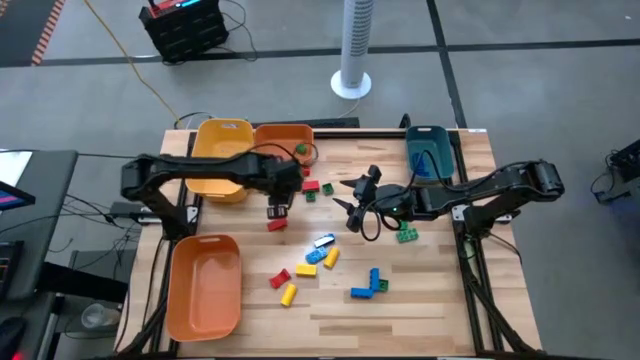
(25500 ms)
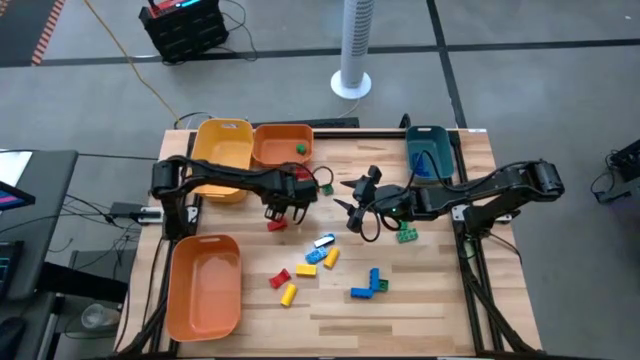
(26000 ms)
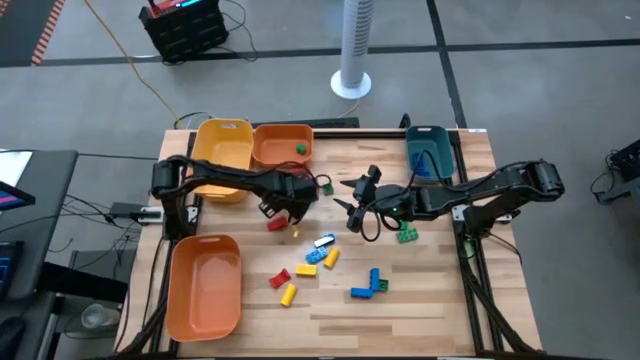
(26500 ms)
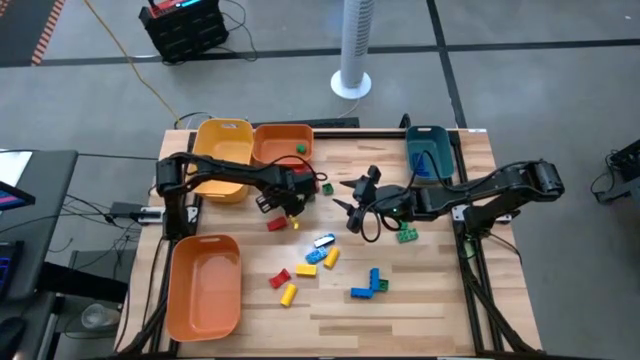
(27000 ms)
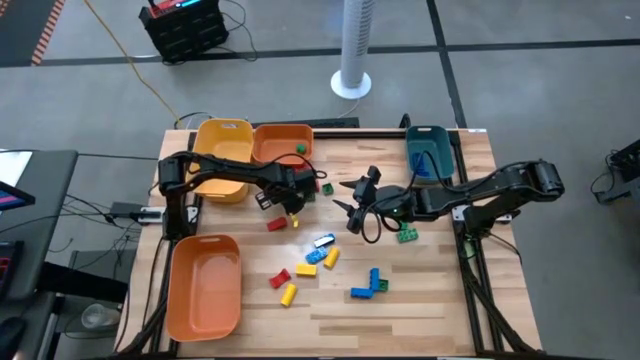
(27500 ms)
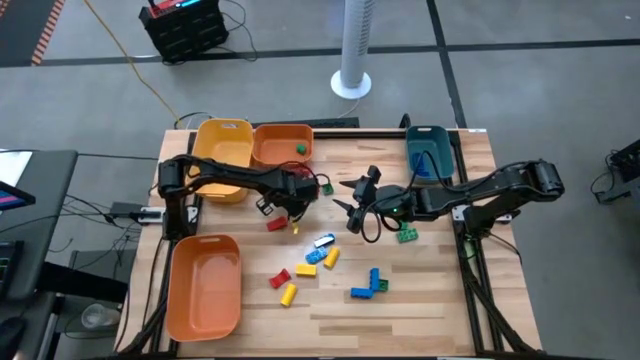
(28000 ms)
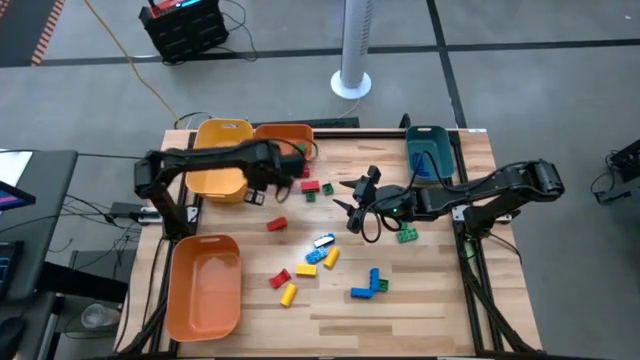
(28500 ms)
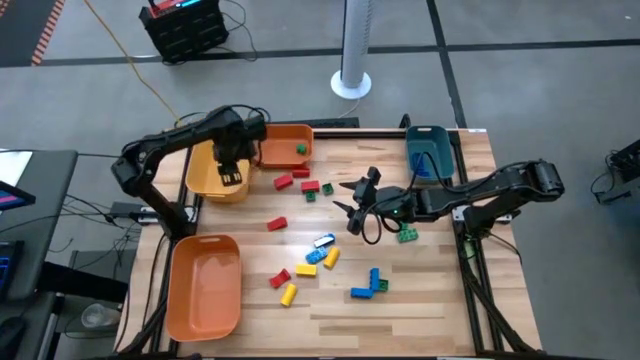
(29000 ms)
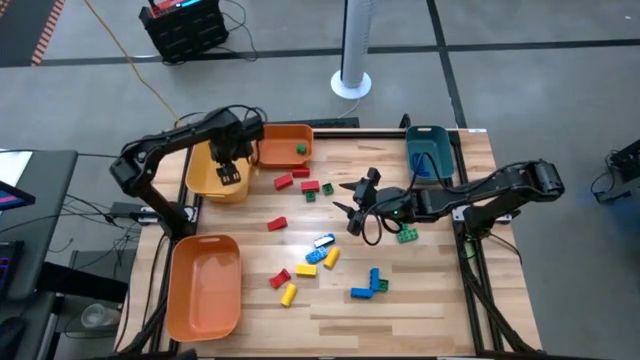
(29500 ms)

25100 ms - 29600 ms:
Task: Sort blocks
Put the yellow wooden block into the yellow bin

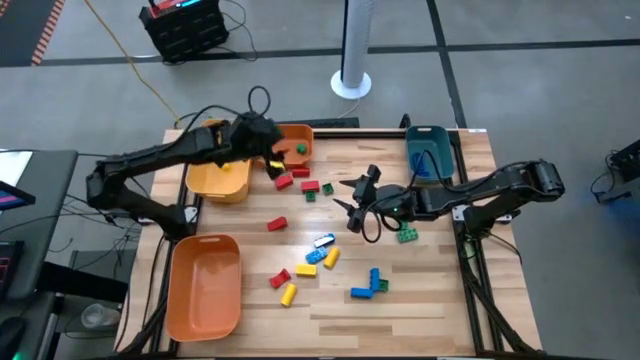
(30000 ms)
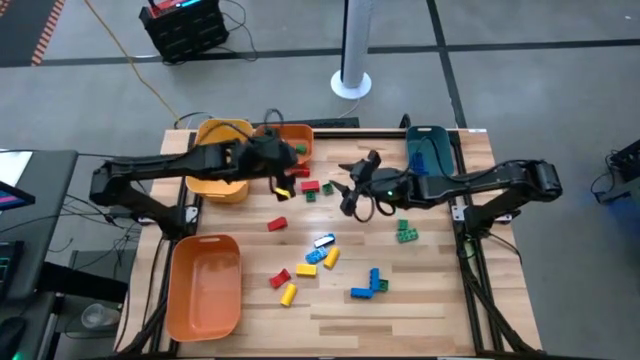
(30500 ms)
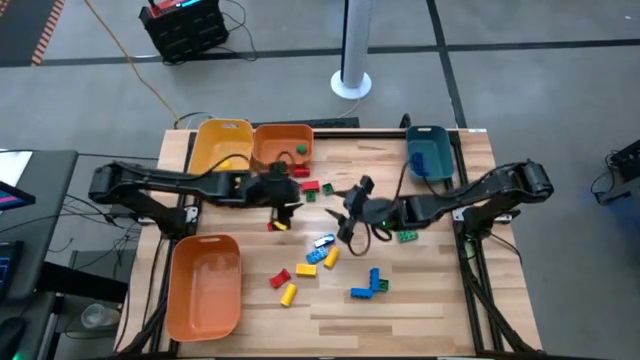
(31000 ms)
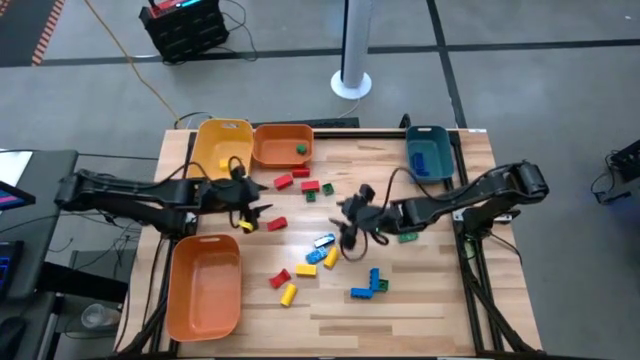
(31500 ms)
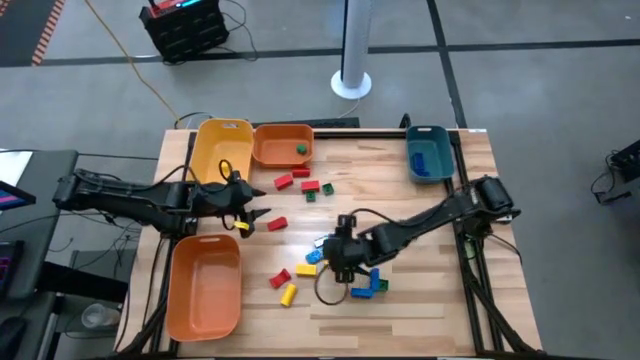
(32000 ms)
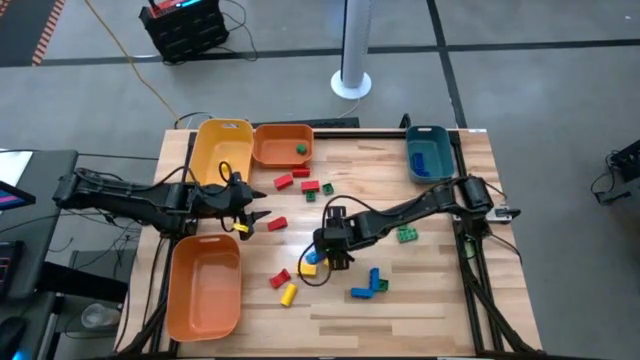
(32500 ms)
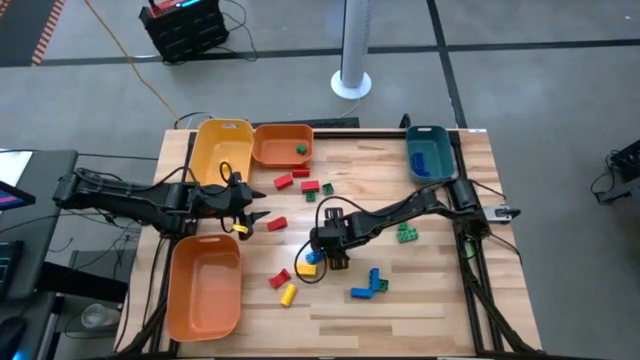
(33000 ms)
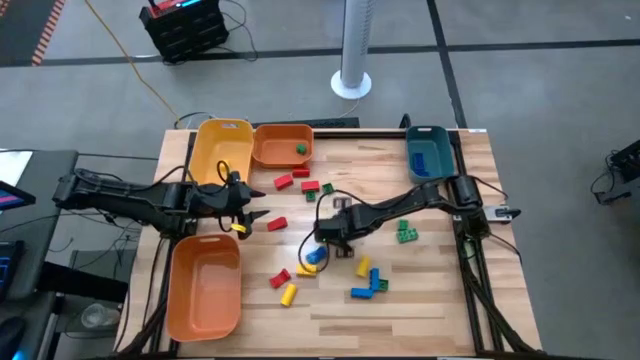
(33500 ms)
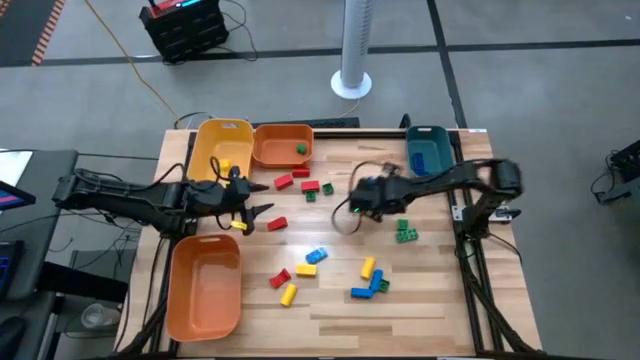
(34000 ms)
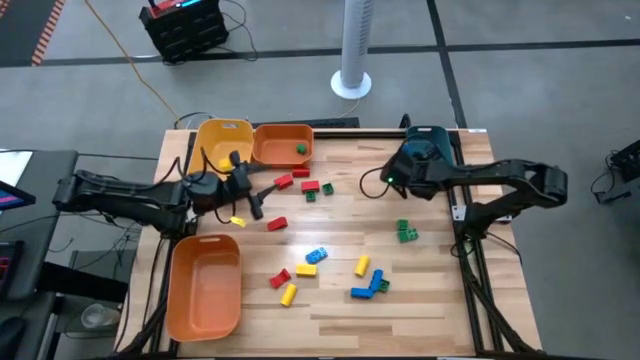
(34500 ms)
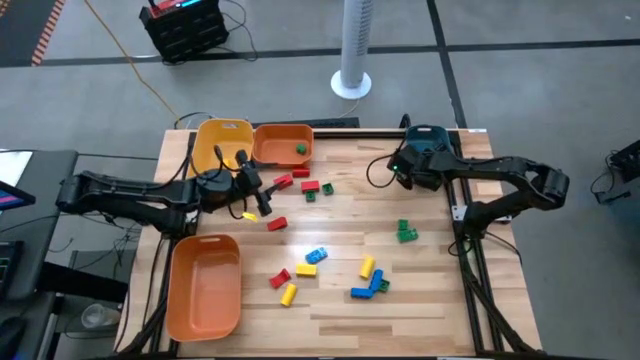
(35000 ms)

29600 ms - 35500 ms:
Put the blue game piece into the blue bin

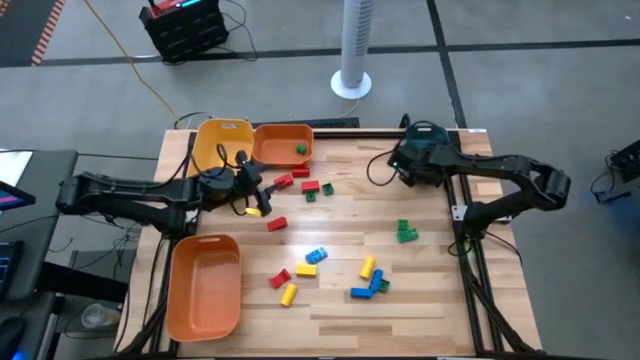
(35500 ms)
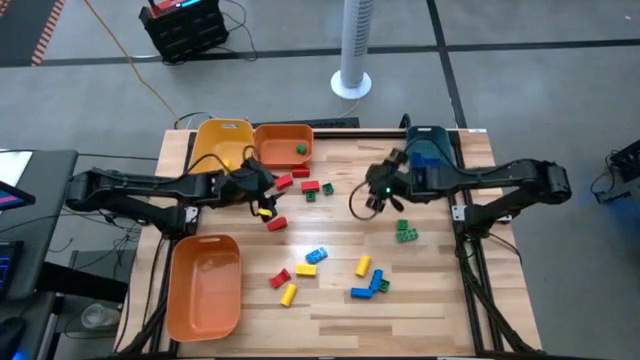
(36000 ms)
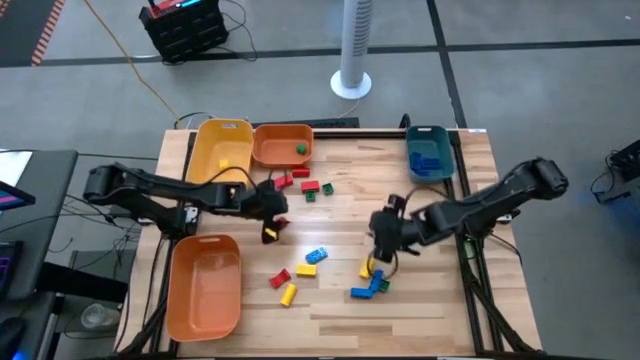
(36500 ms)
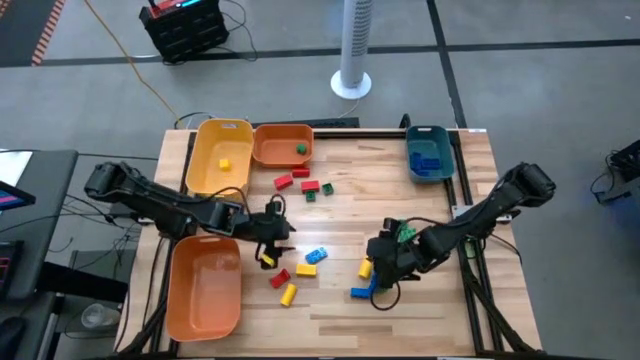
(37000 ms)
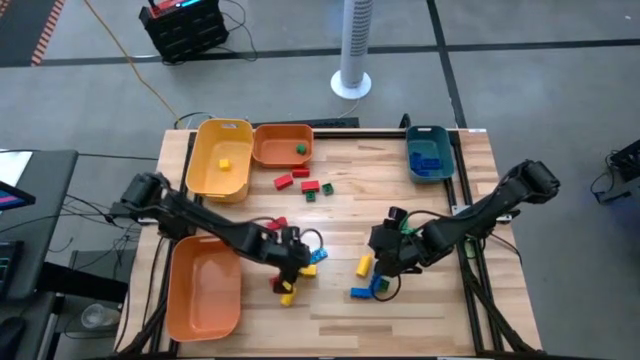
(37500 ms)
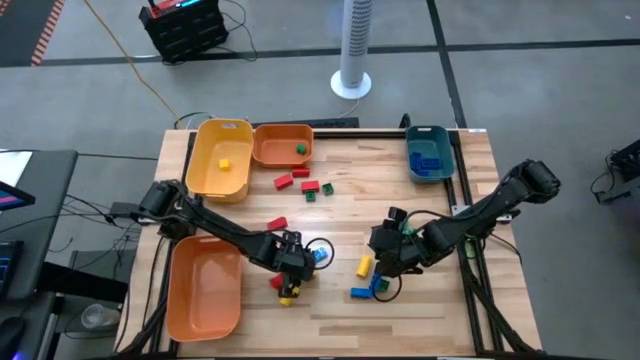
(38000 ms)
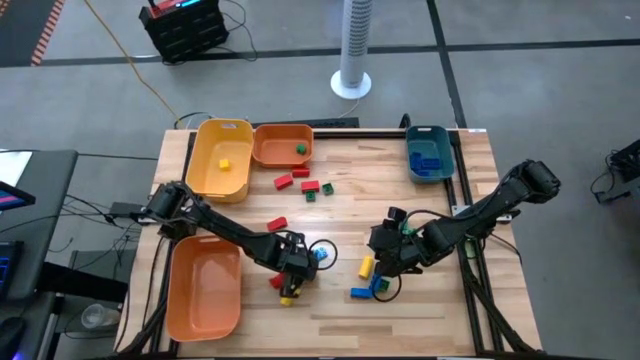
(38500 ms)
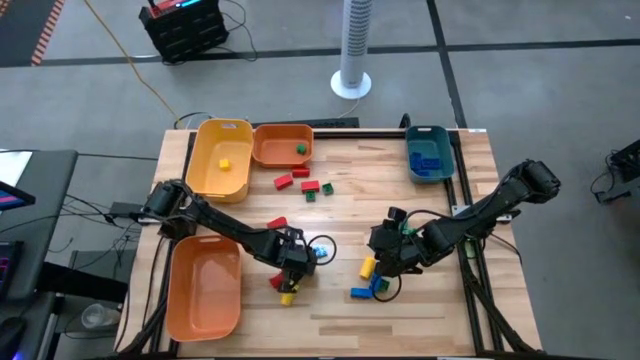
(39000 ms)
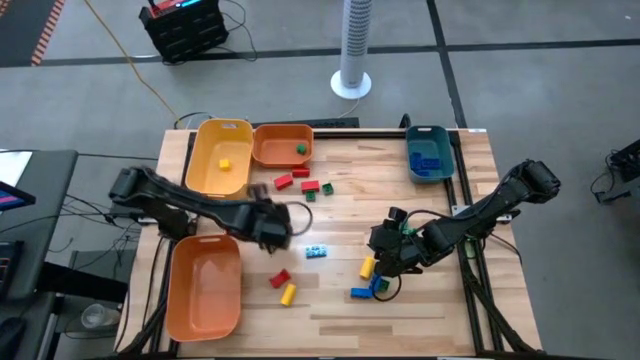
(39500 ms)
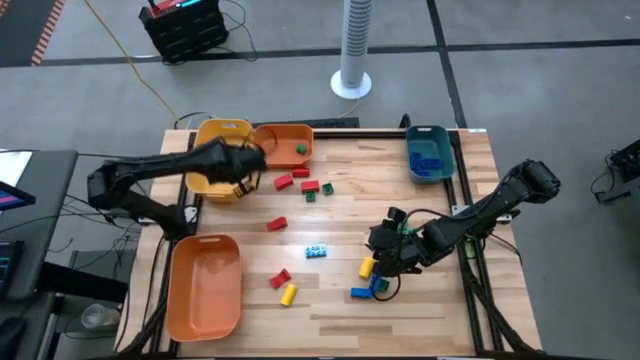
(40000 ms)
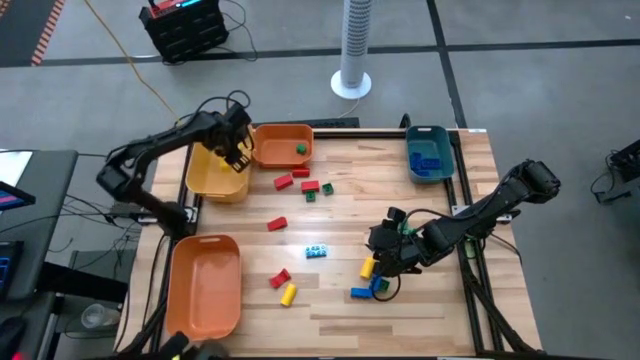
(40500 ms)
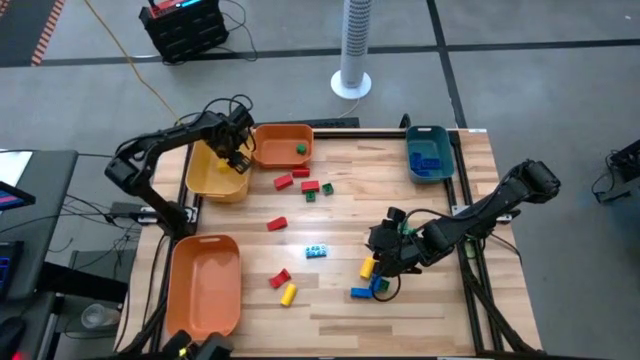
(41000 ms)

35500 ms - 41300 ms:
Put the yellow wooden block into the yellow bin

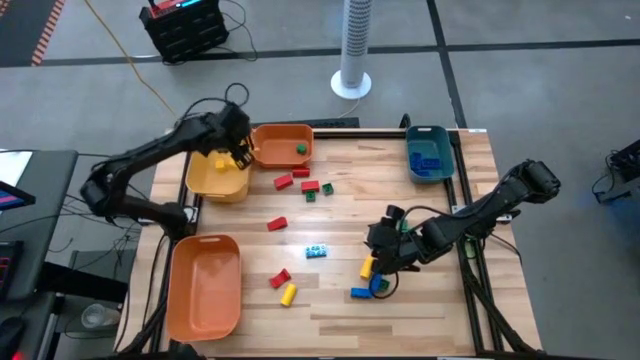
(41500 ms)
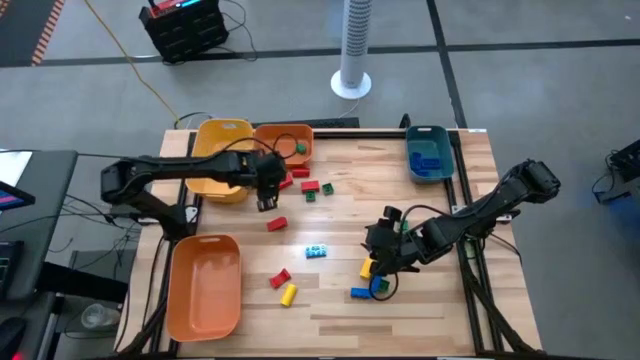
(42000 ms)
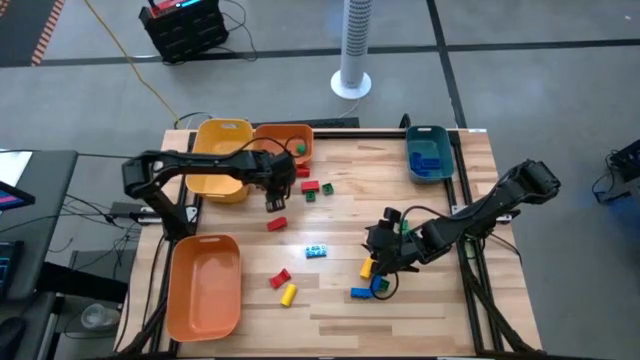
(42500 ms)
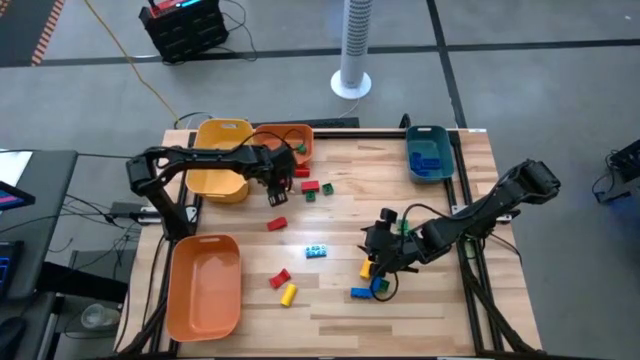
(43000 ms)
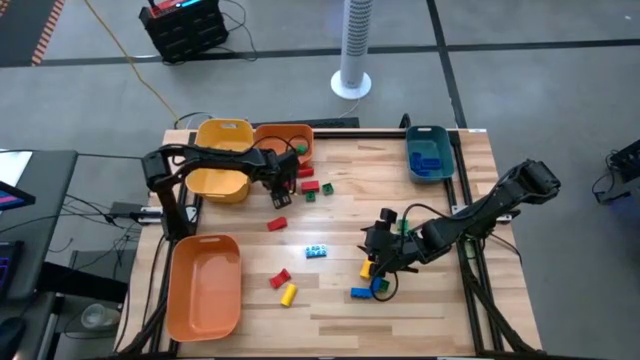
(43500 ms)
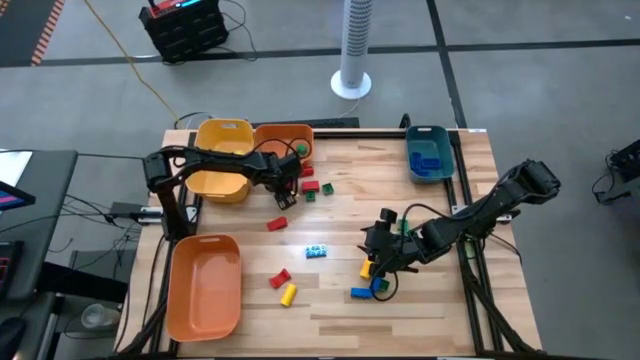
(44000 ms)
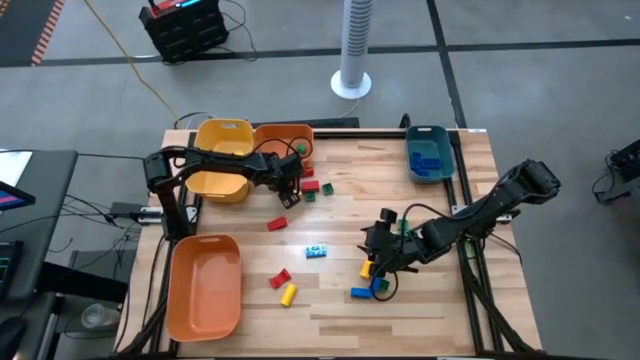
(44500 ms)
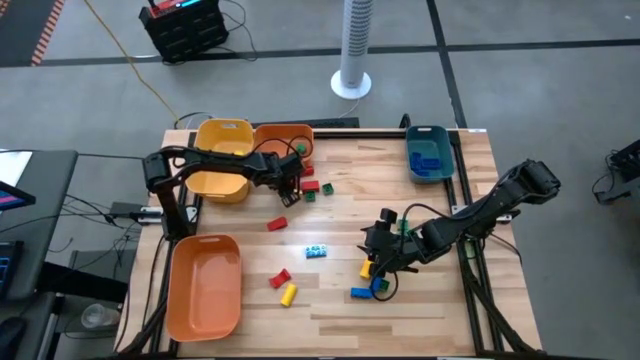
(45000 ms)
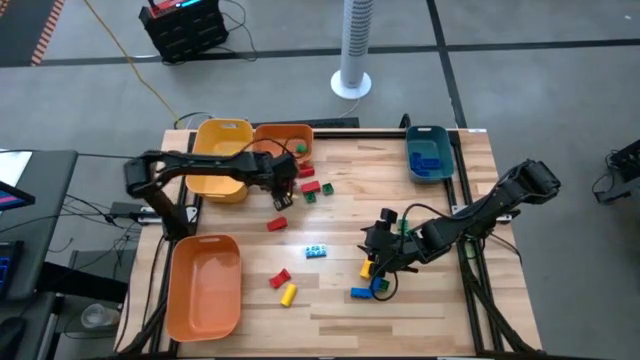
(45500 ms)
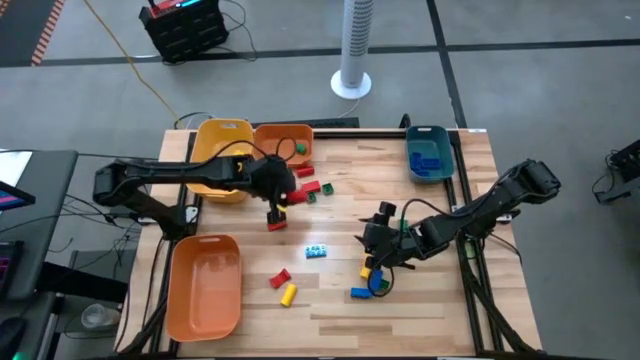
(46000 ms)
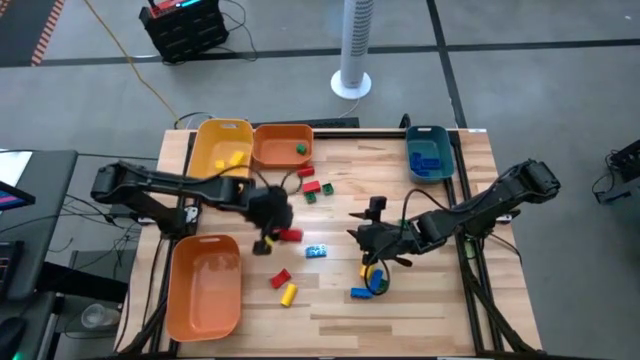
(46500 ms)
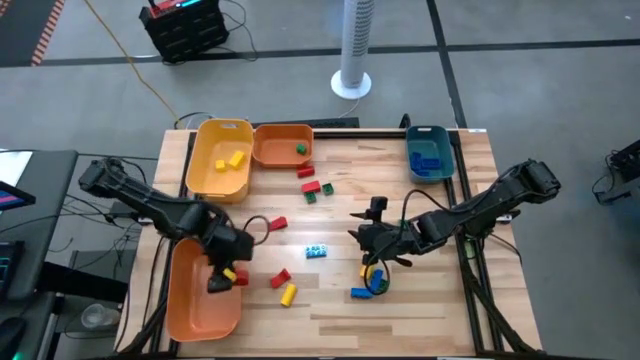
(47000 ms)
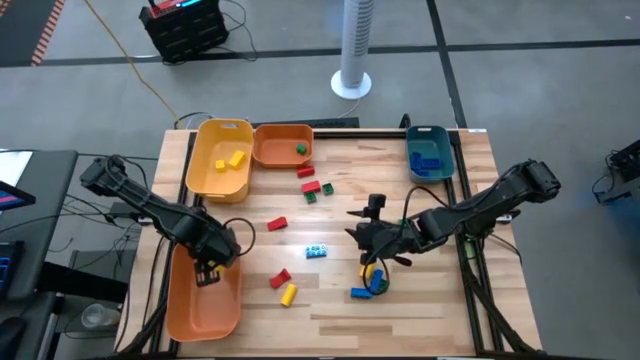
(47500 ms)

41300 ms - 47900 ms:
Put the red wooden block into the bottom orange bin
